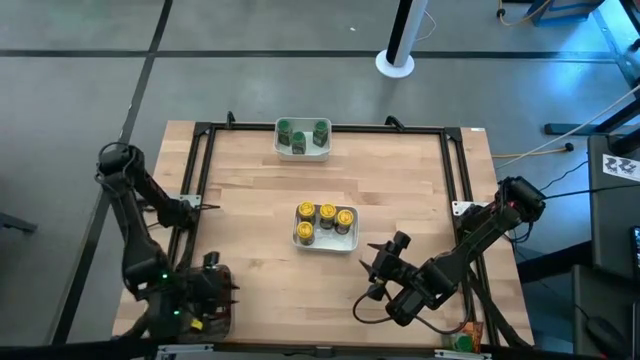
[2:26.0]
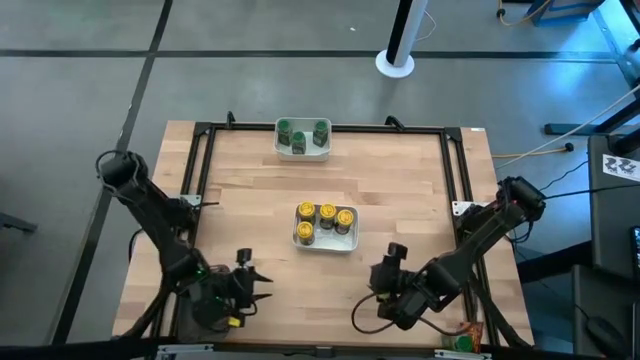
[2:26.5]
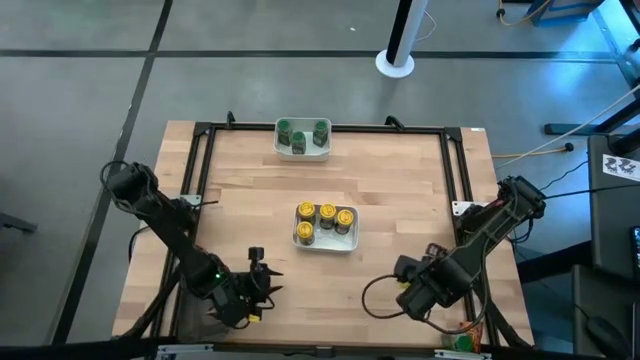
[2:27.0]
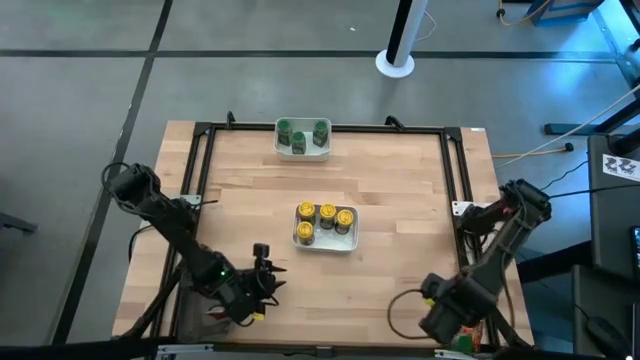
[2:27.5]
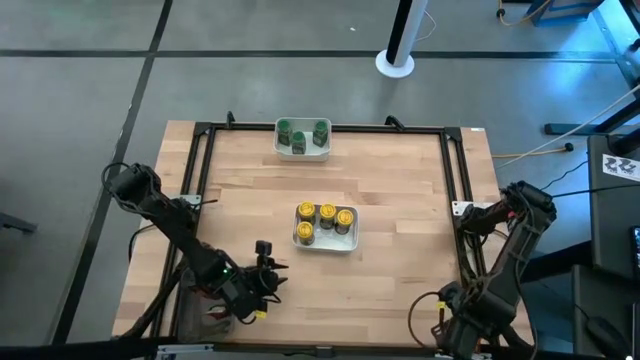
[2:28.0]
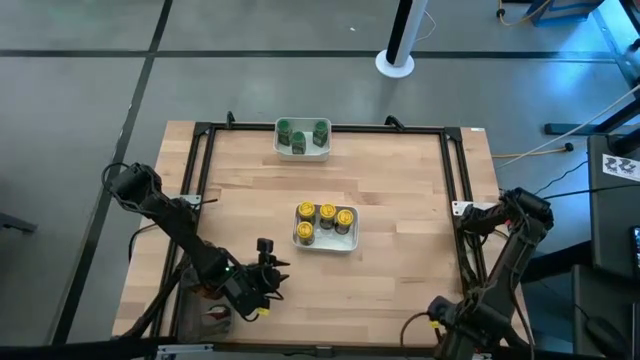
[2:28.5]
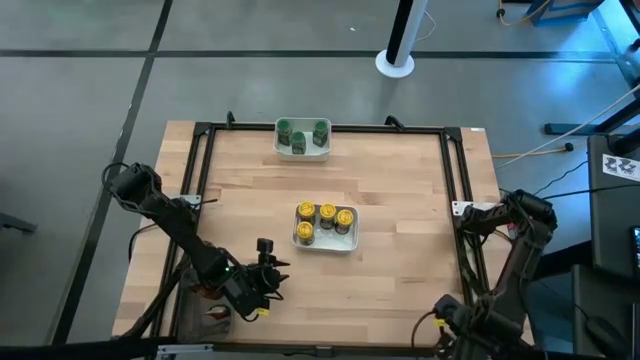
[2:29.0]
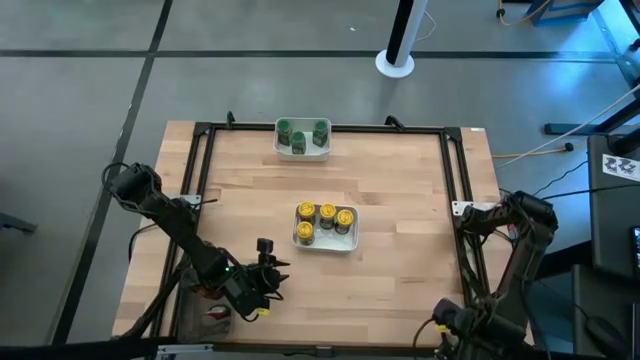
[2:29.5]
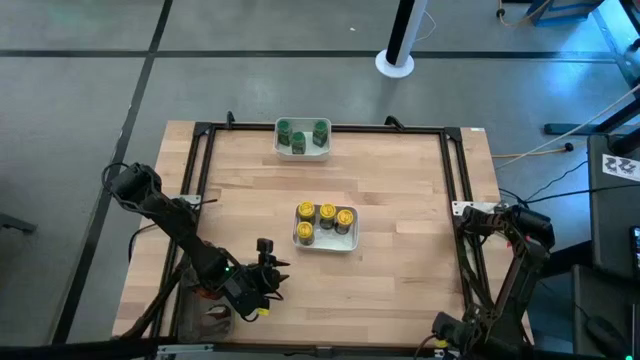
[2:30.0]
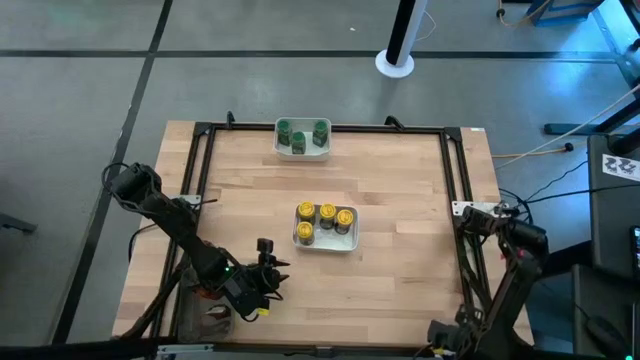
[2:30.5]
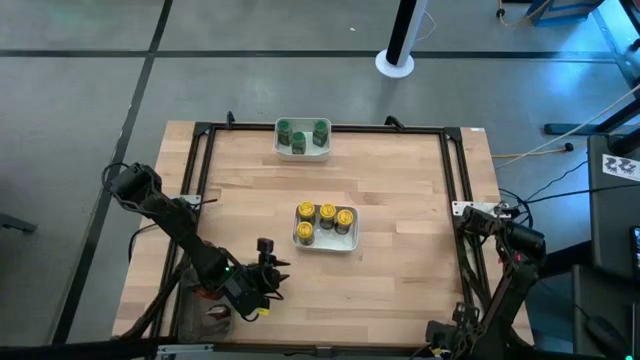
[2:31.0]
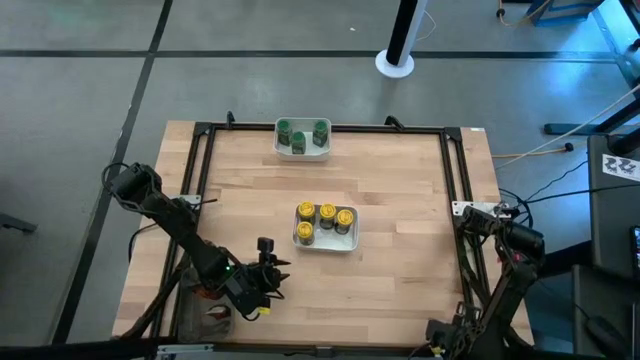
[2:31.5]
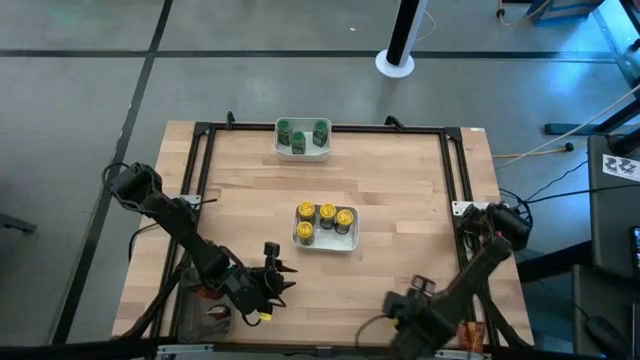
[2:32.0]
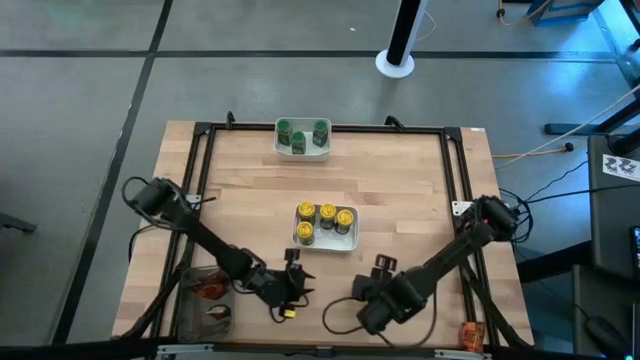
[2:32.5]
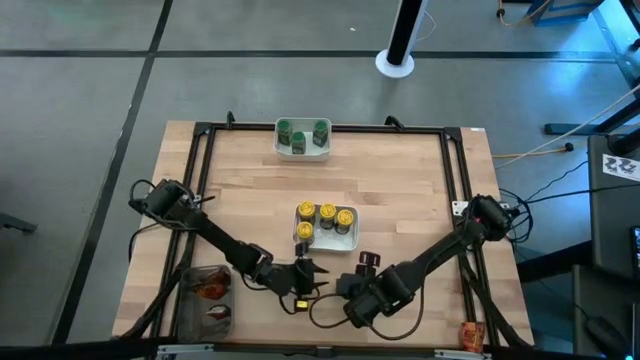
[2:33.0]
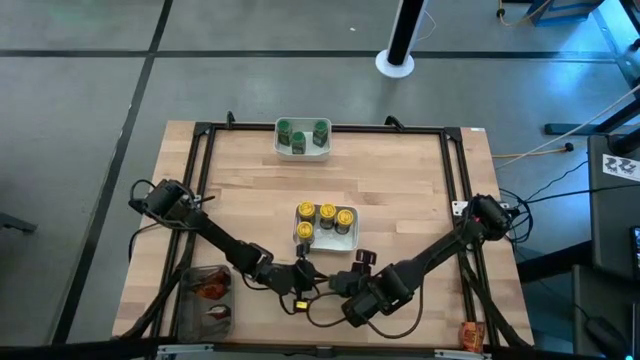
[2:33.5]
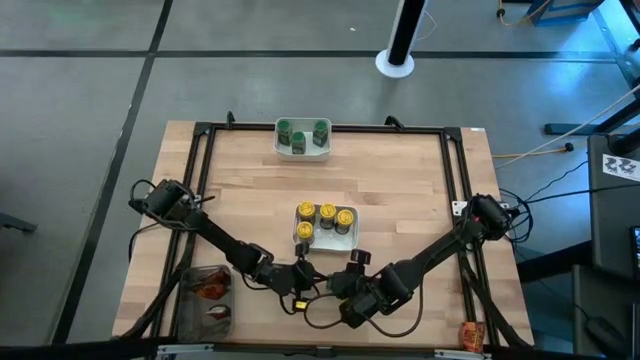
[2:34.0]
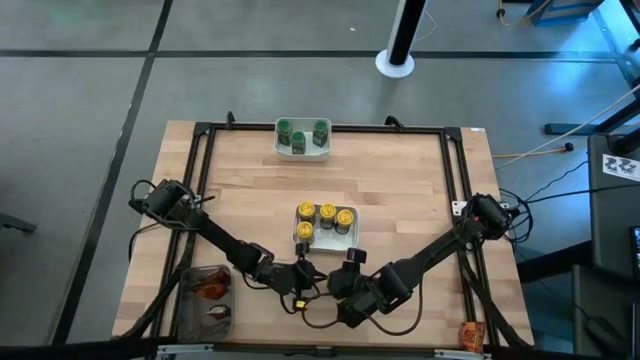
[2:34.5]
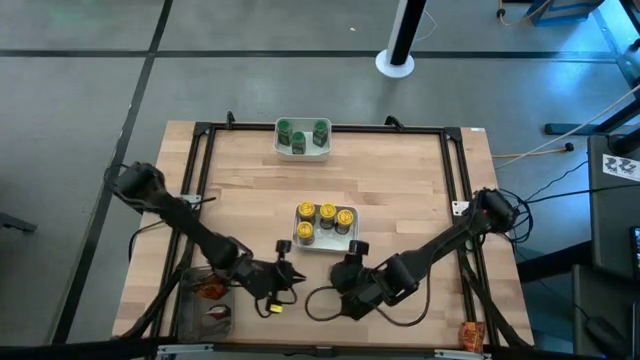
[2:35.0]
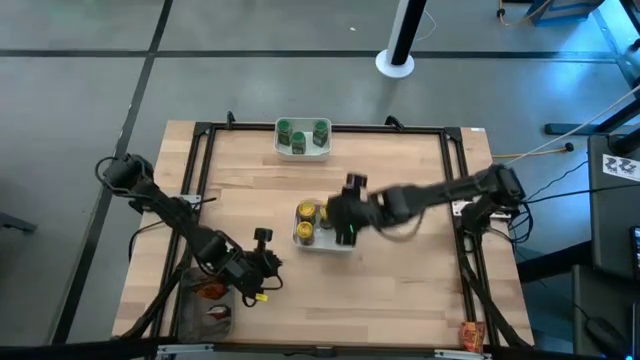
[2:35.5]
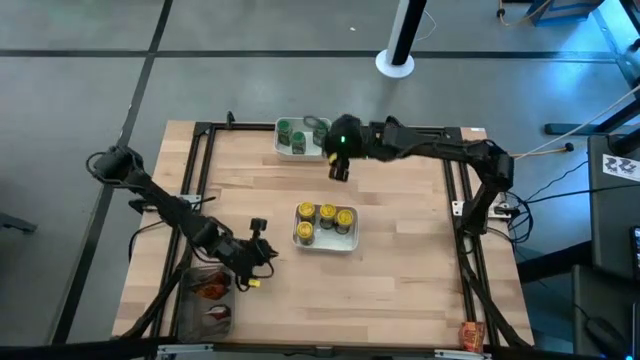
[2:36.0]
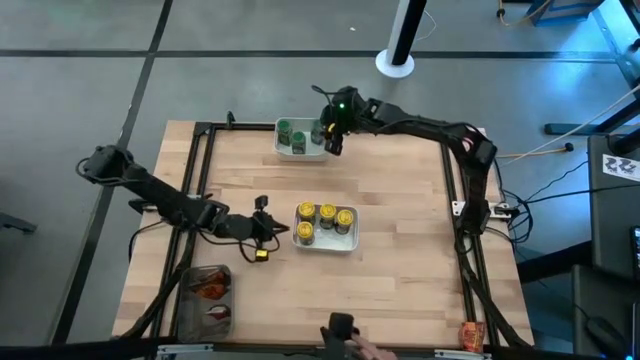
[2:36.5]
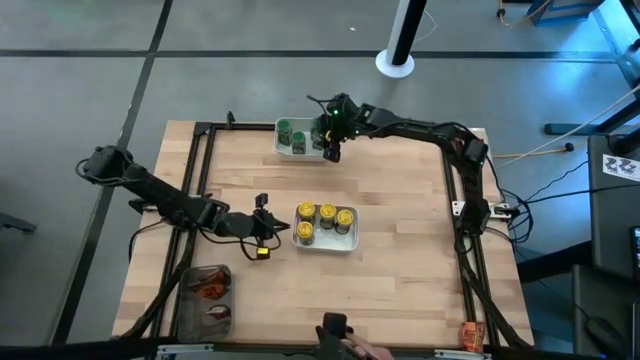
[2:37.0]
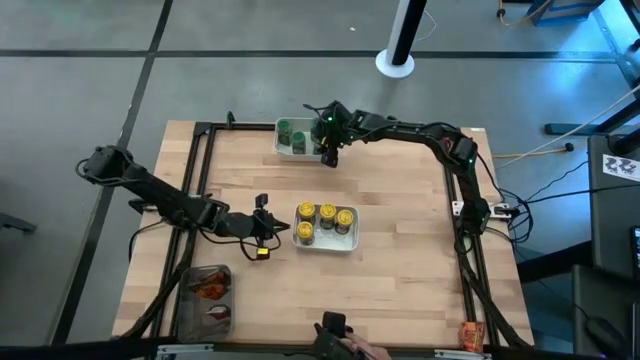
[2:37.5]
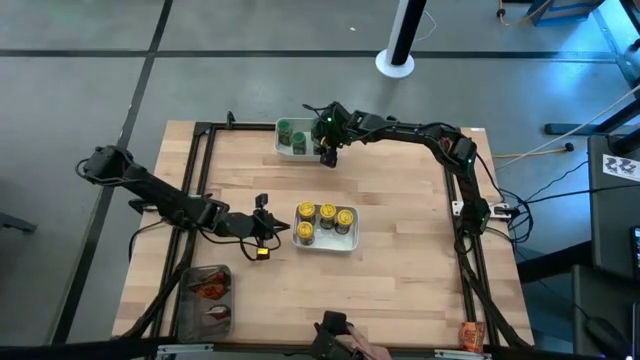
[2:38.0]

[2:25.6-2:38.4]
Task: Sort spices by type
Put the green seasoning bottle into the top white bin

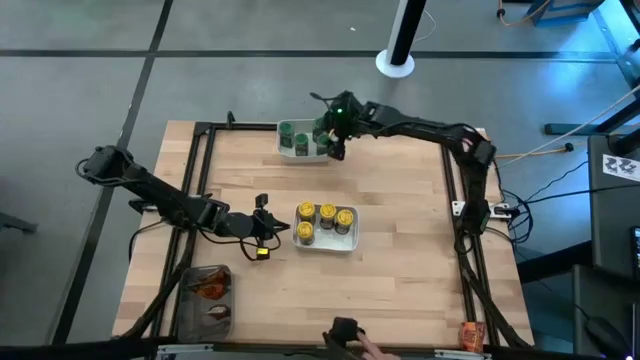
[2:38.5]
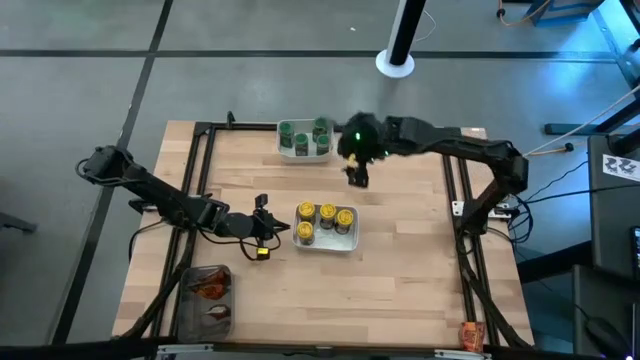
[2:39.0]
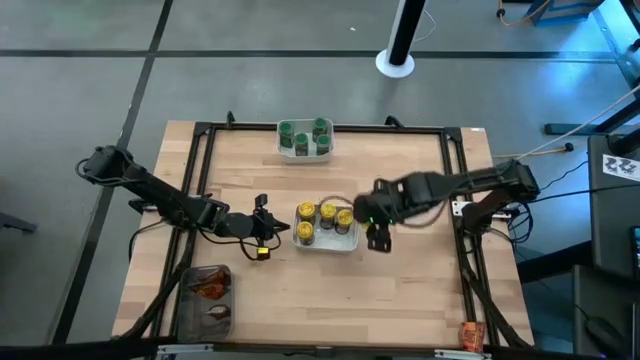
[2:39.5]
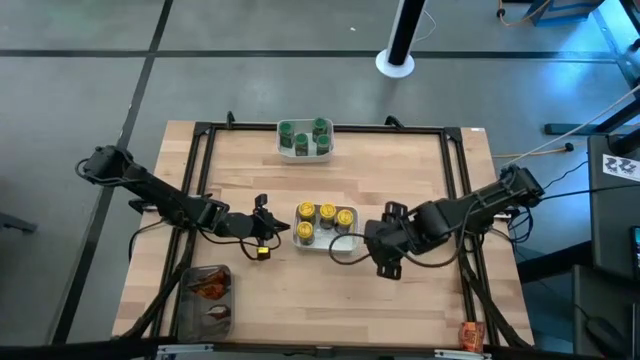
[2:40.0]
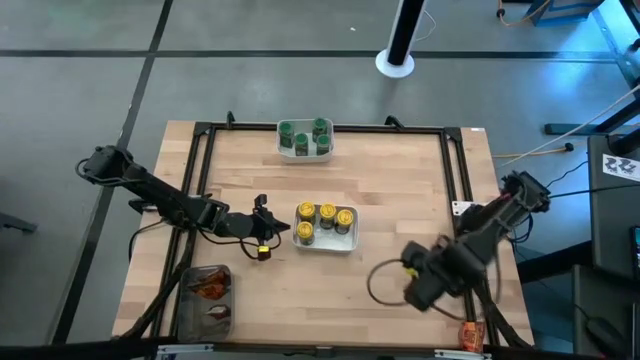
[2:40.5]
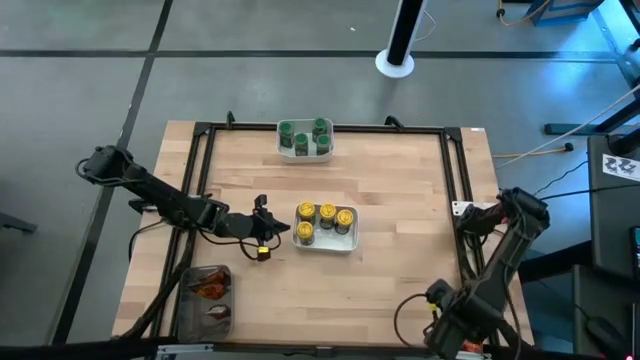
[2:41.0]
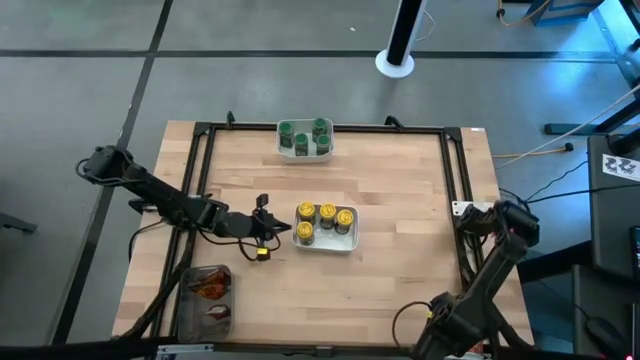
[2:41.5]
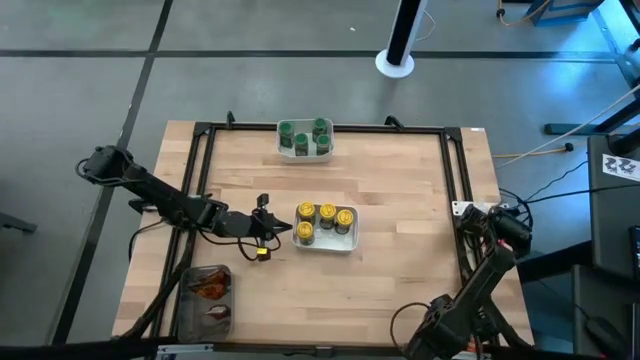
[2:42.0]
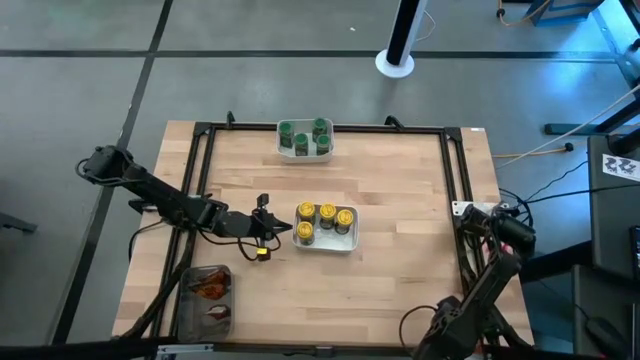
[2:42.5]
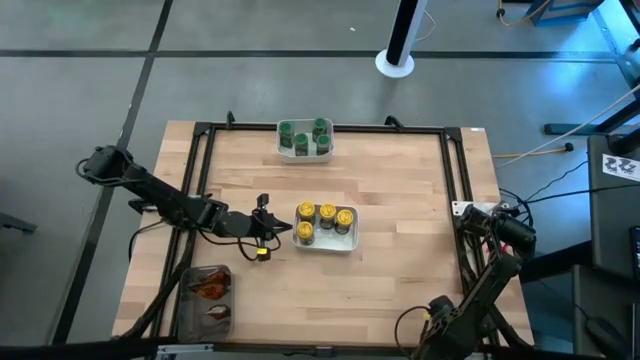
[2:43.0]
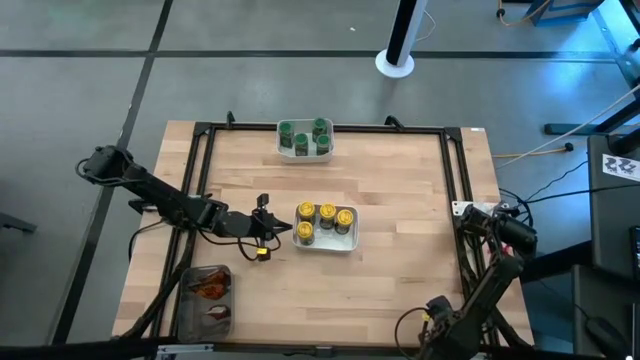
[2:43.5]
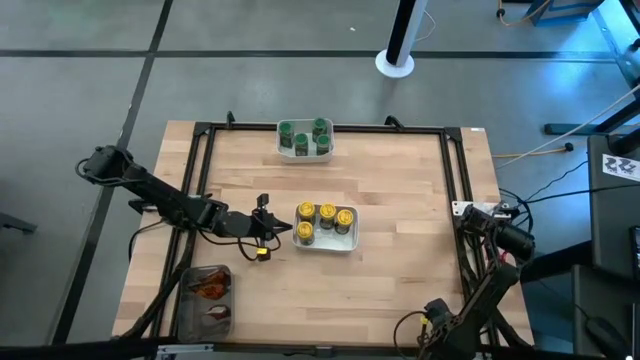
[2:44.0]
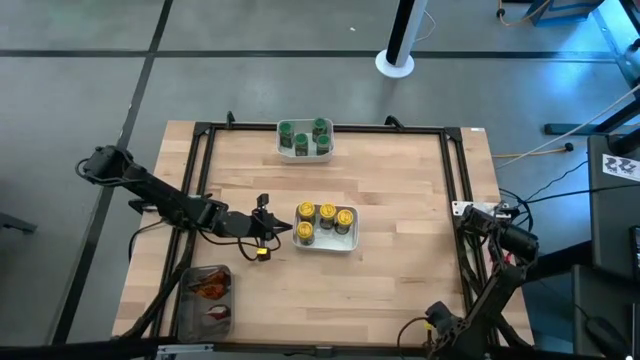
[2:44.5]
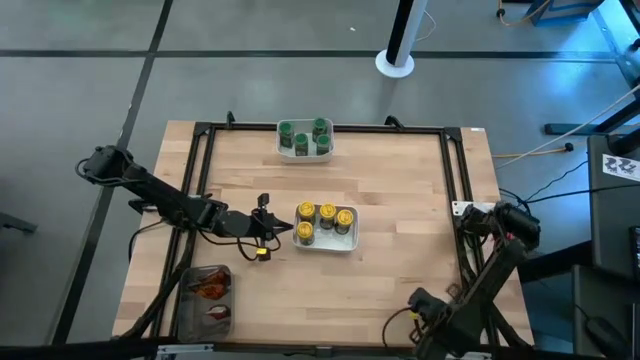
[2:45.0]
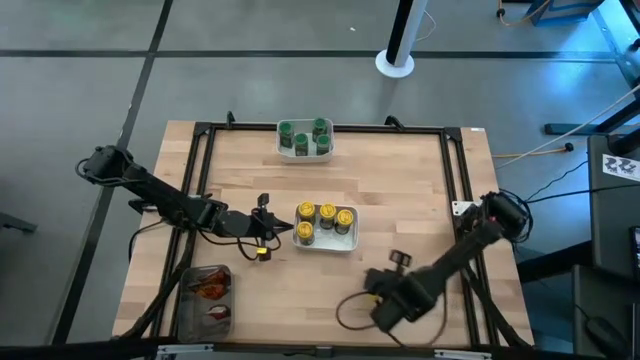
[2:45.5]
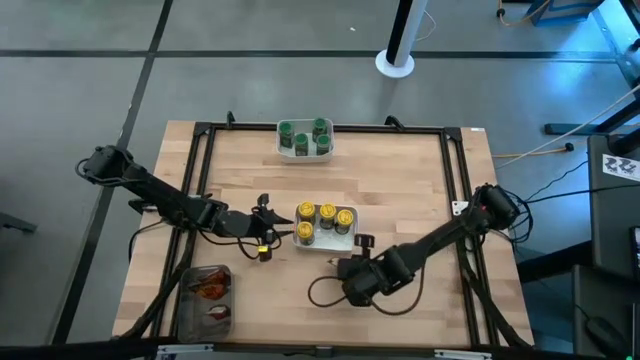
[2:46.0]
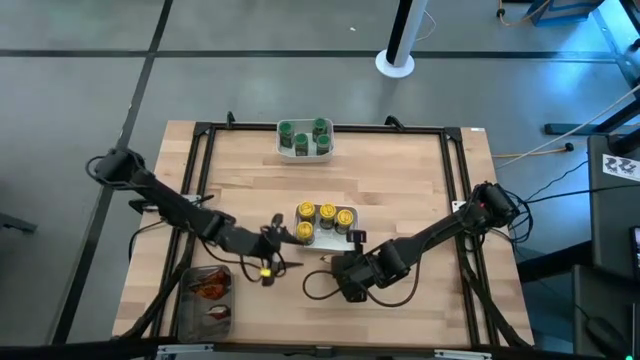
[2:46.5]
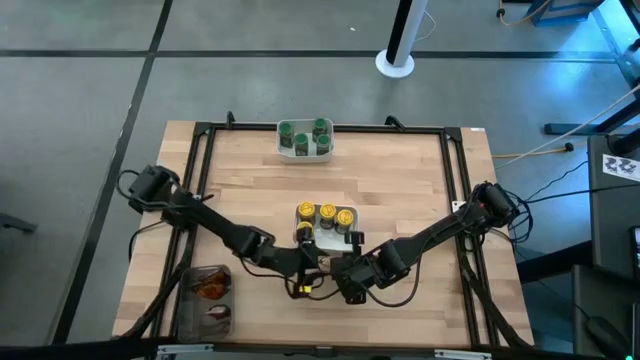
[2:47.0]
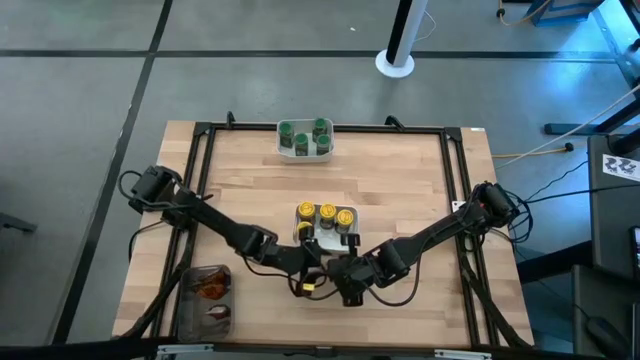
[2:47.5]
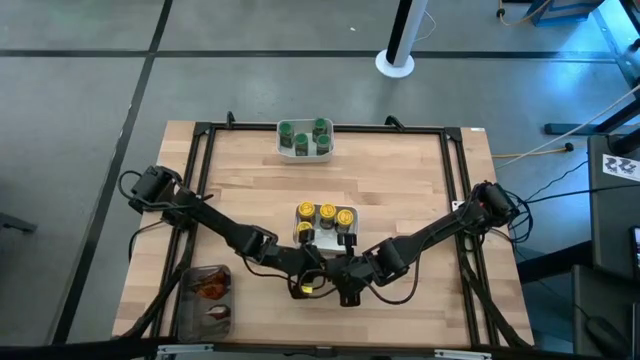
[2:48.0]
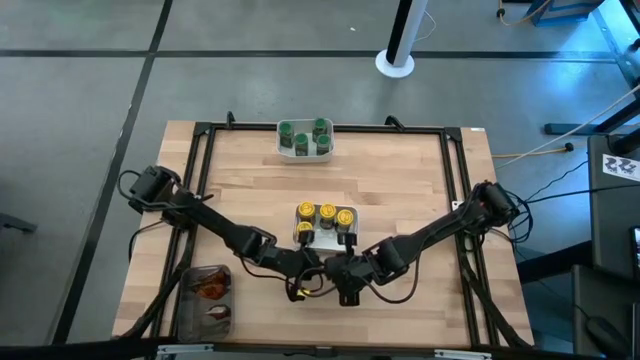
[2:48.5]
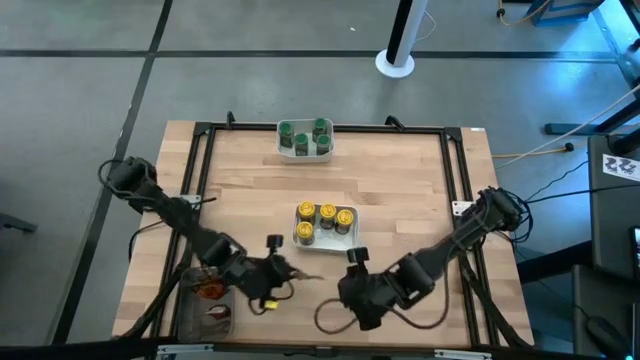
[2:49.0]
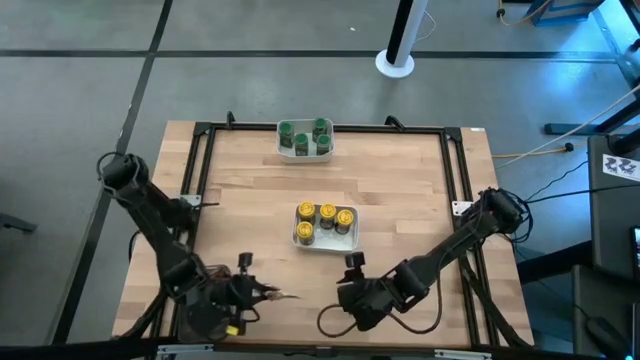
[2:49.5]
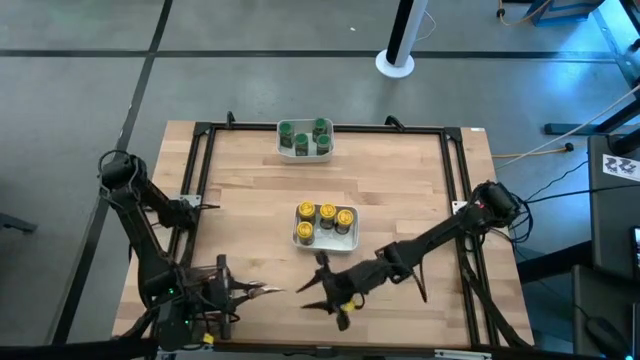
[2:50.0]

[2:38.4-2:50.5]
Put the top orange seasoning pack into the black bin
